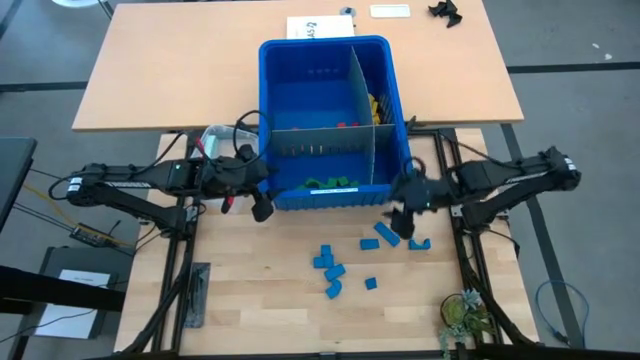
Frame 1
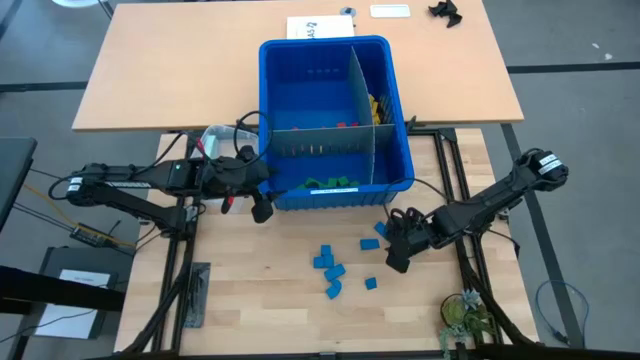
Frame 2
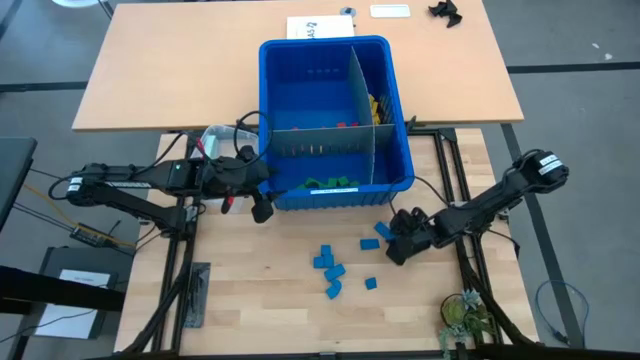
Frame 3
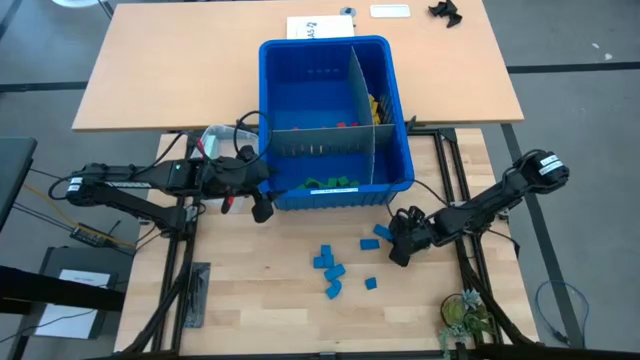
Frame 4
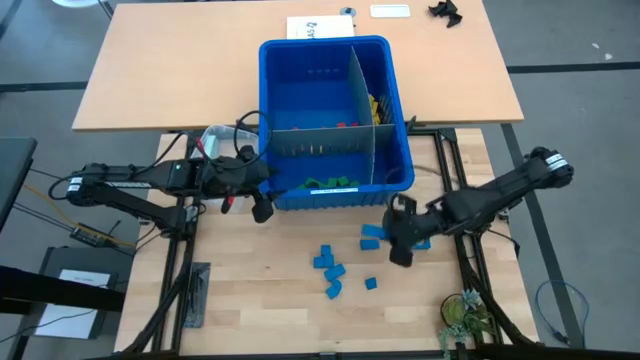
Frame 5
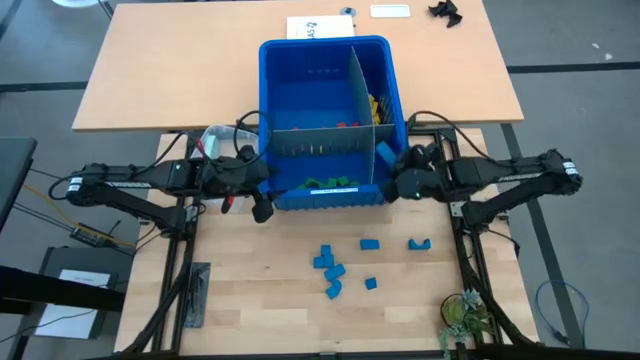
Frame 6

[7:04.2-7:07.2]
Task: Sort blocks
Put the blue block into the blue bin

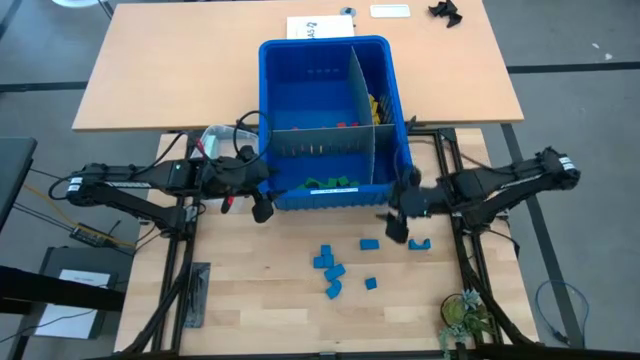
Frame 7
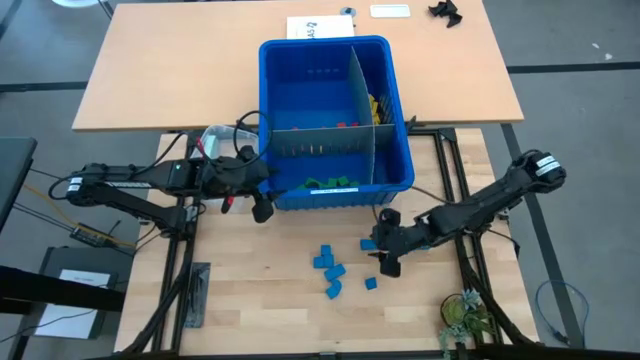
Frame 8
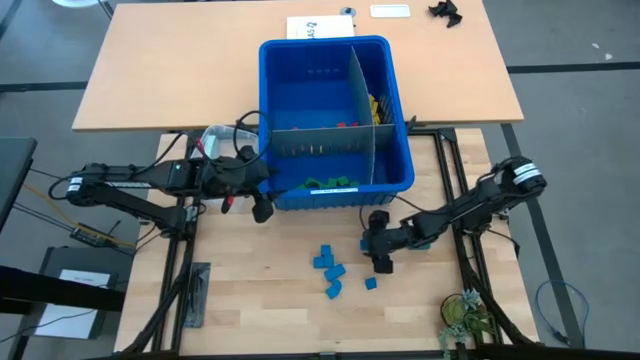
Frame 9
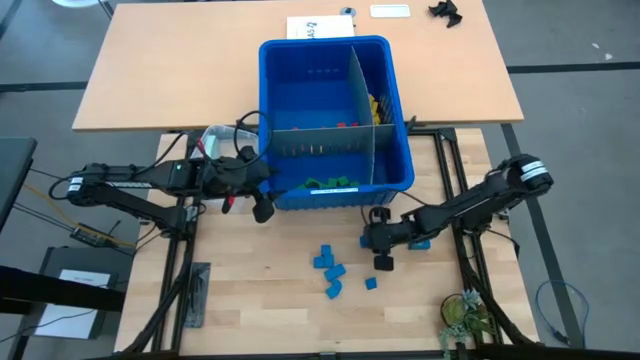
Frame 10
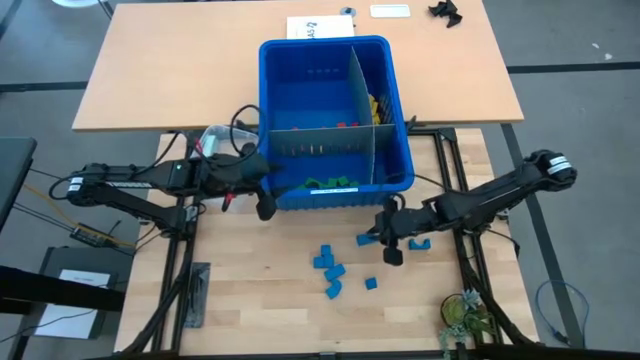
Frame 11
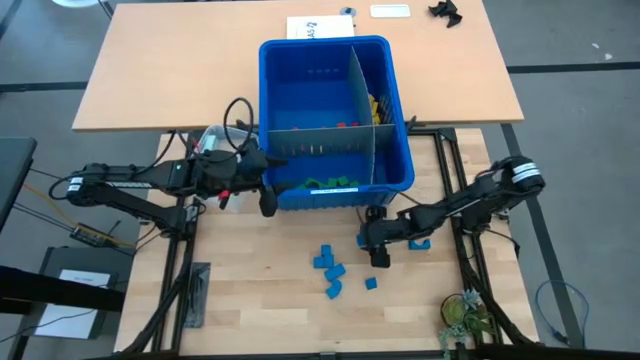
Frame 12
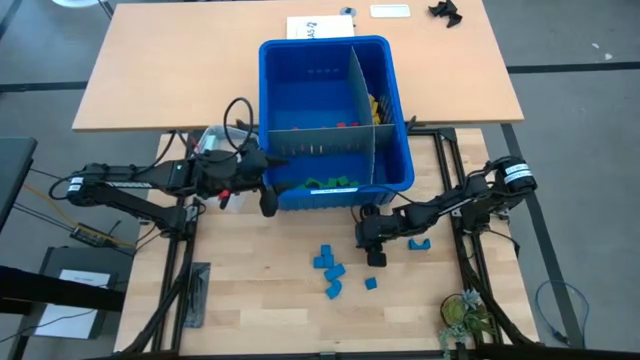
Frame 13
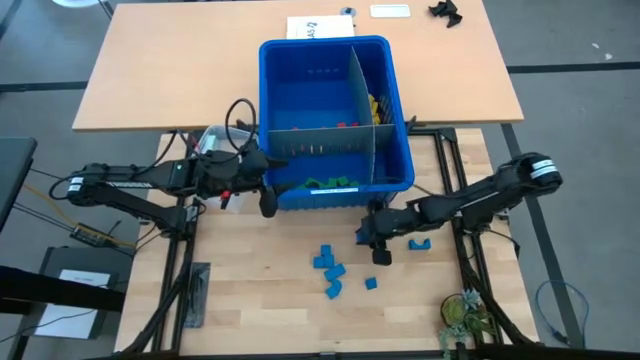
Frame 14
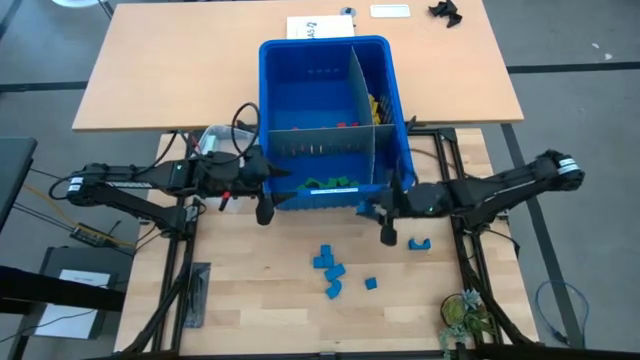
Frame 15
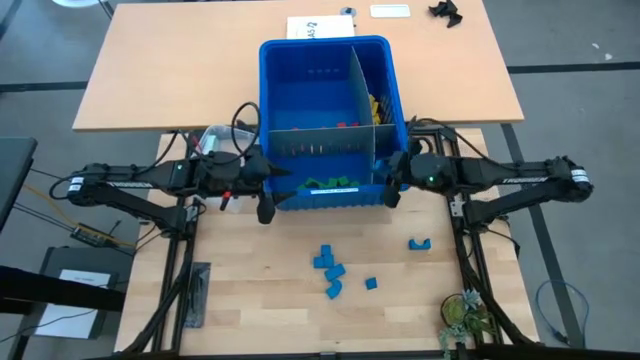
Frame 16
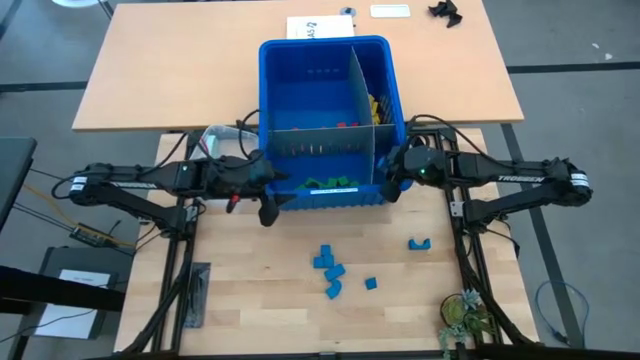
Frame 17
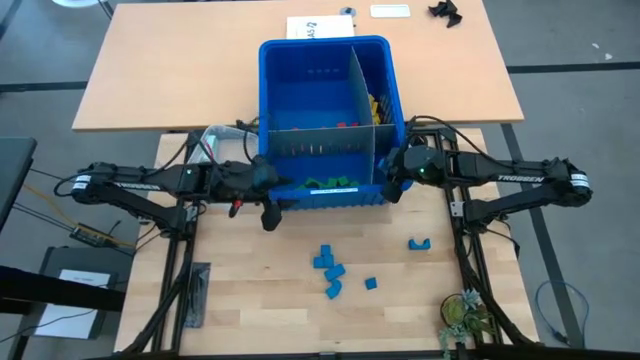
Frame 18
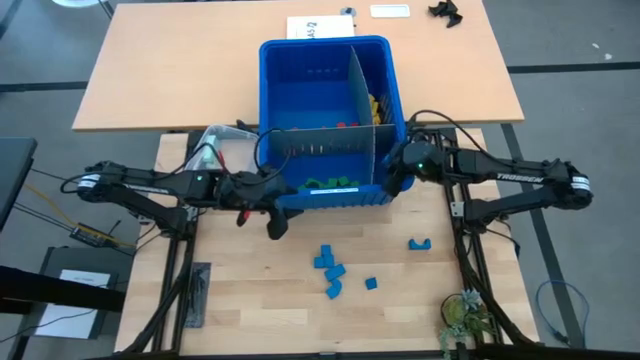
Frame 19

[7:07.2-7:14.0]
Put the blue block into the blue bin

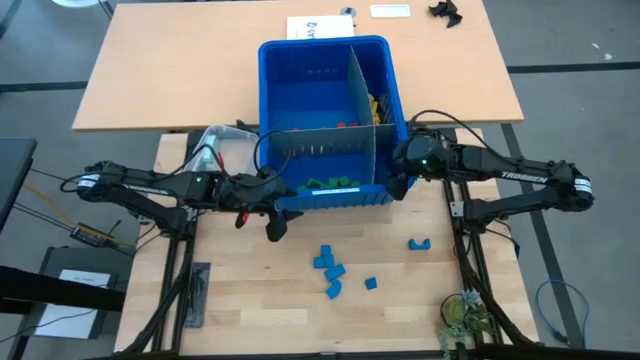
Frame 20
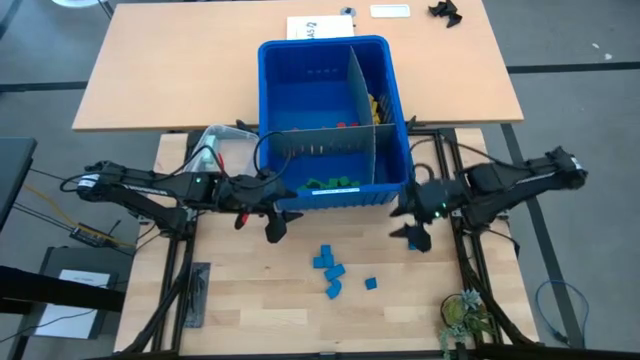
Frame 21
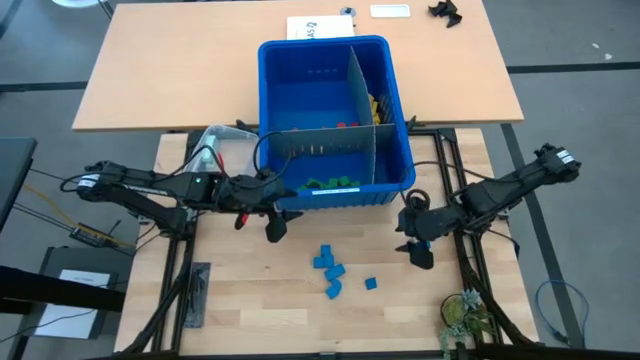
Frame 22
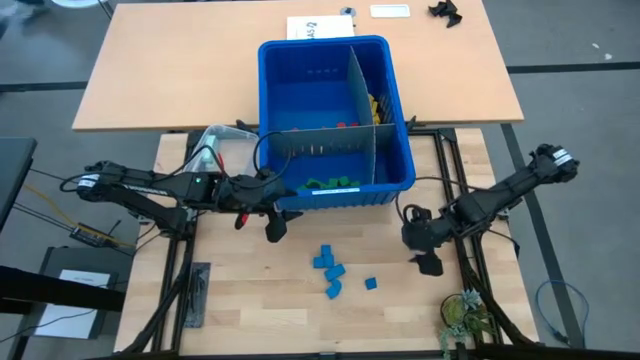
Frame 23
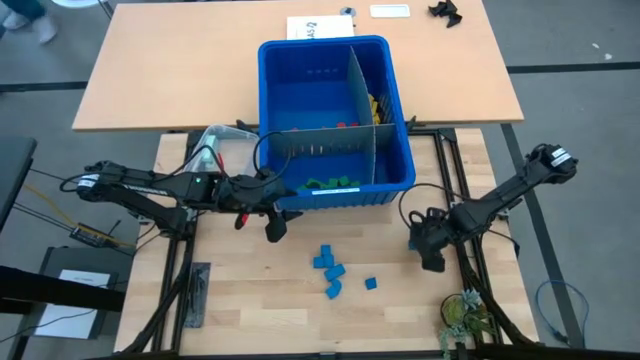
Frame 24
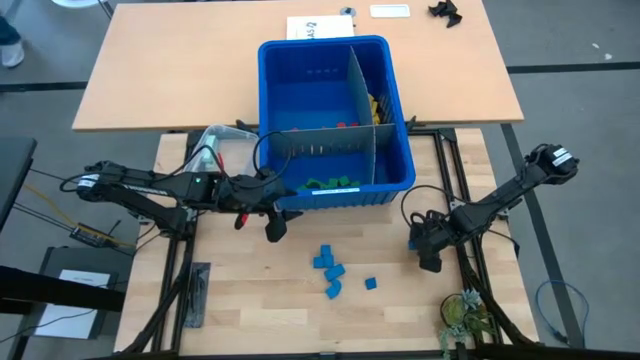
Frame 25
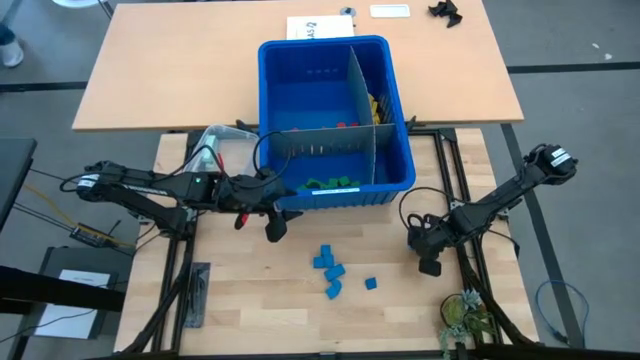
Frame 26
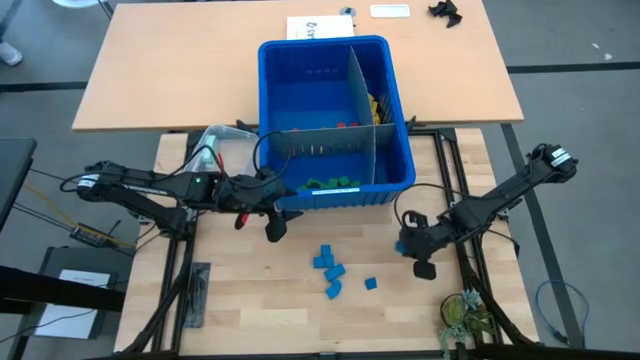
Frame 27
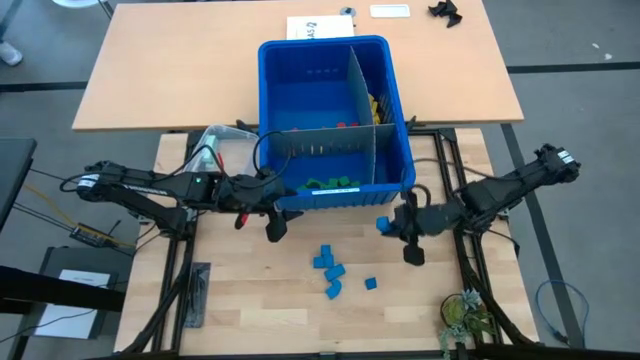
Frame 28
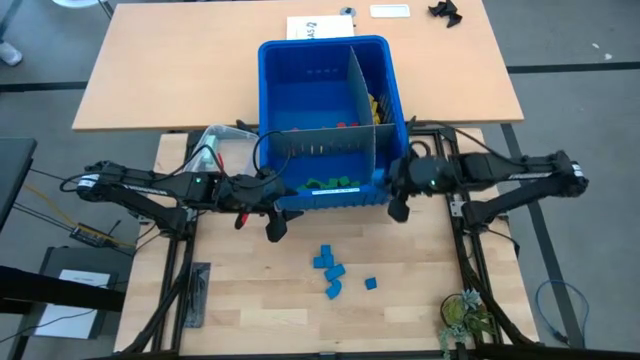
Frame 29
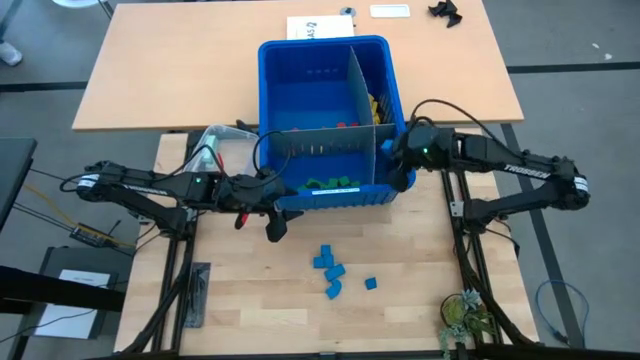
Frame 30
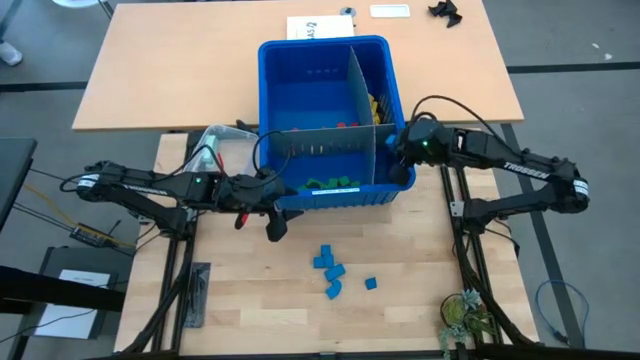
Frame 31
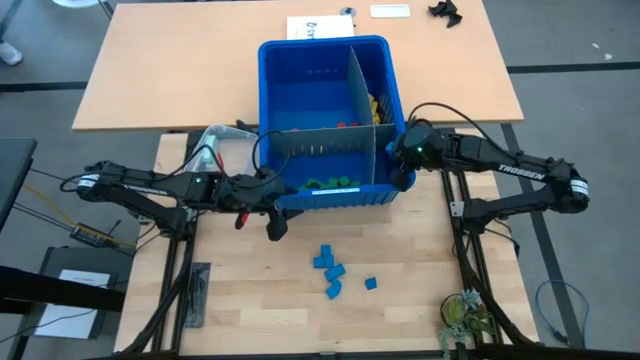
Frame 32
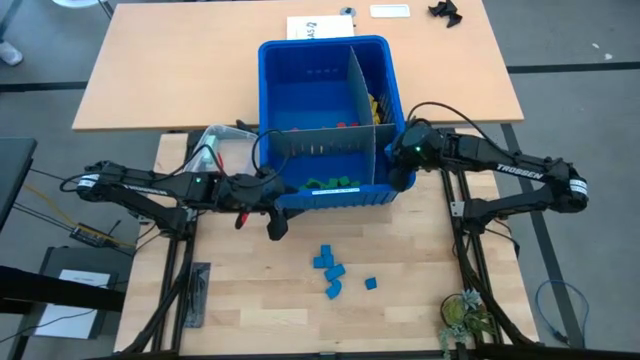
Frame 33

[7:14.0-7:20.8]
Put the blue block into the blue bin

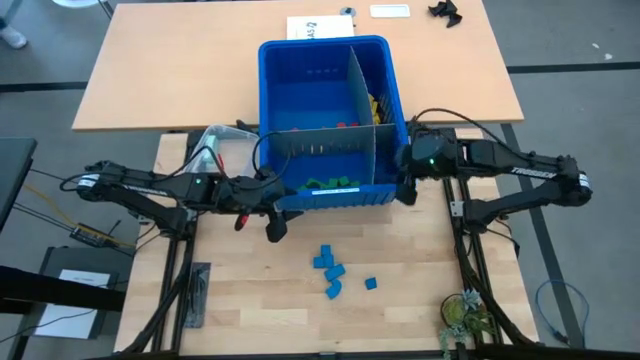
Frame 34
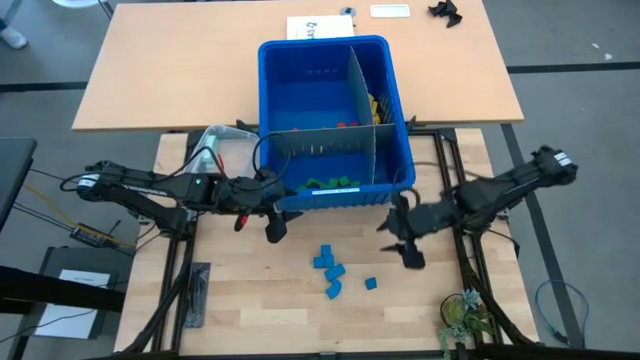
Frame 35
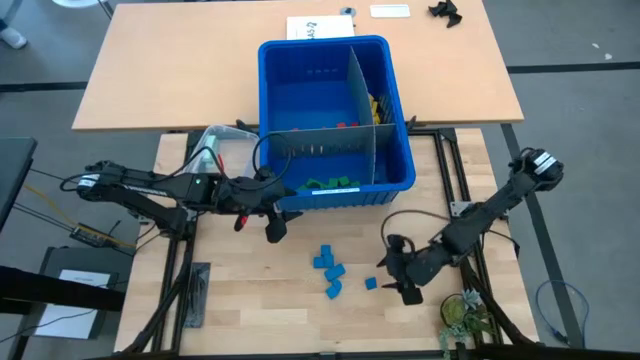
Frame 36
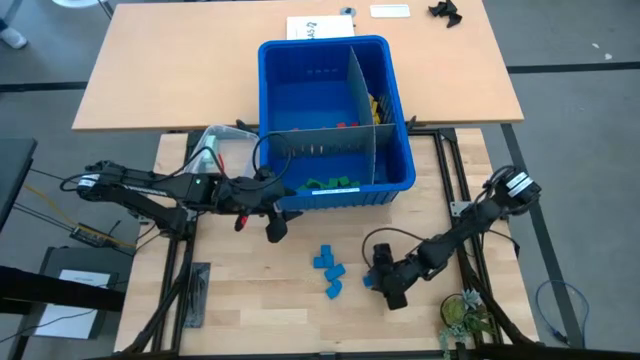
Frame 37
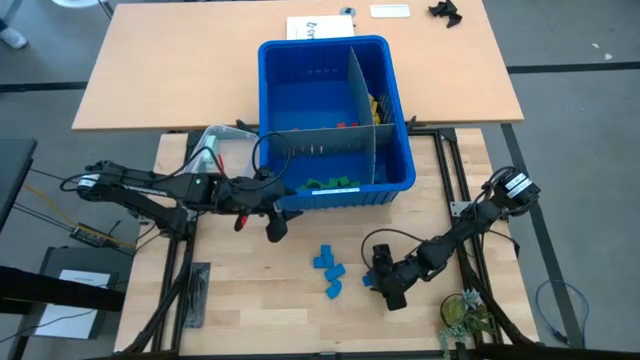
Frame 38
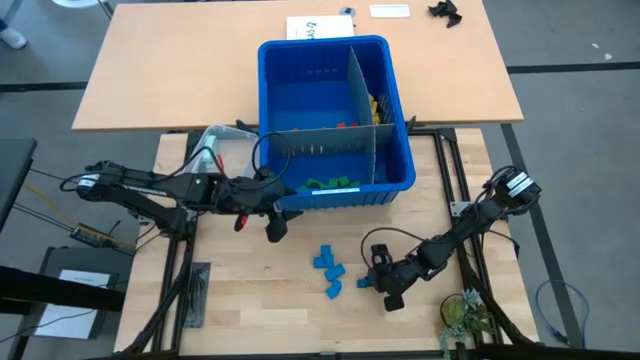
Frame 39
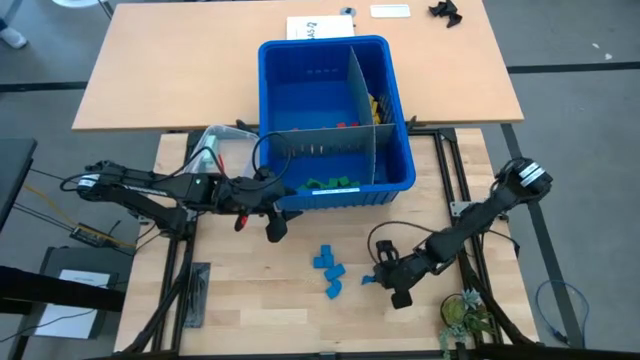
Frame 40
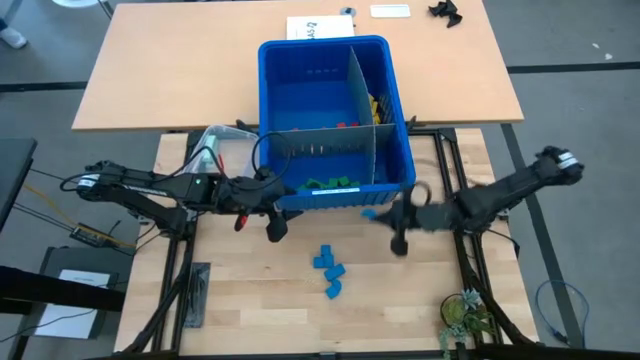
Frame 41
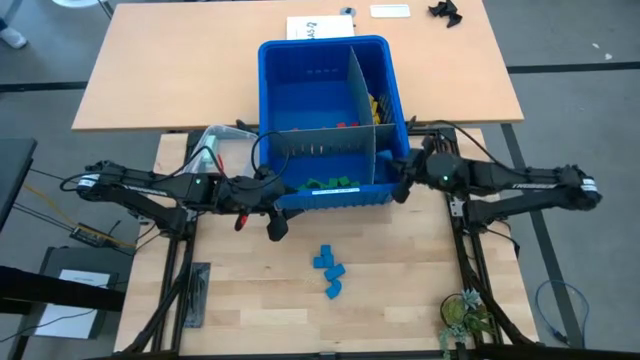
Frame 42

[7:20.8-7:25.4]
Put the blue block into the blue bin
